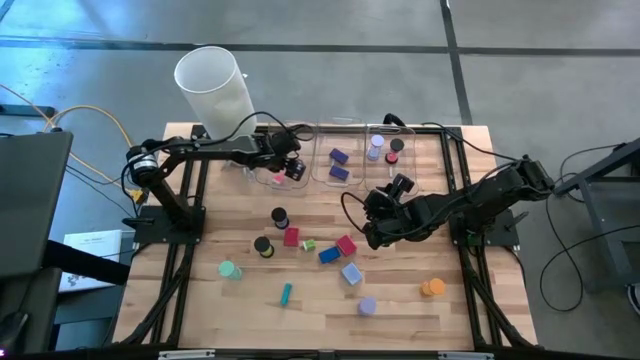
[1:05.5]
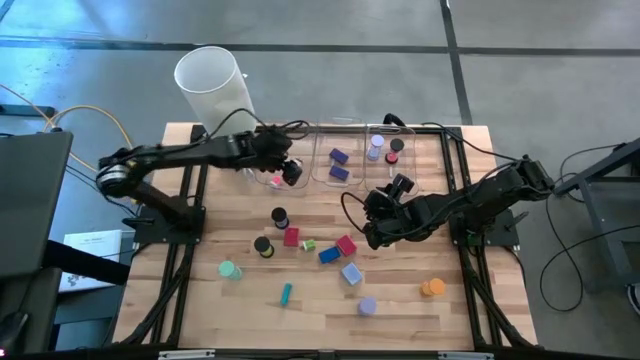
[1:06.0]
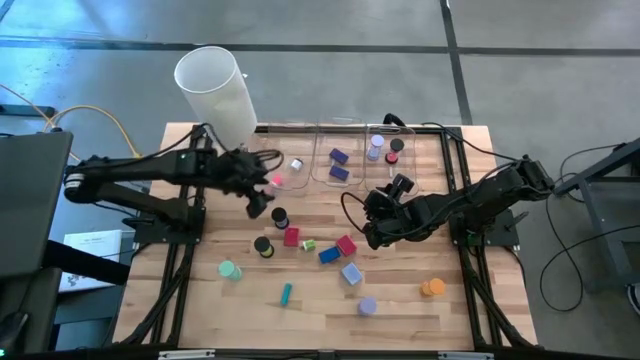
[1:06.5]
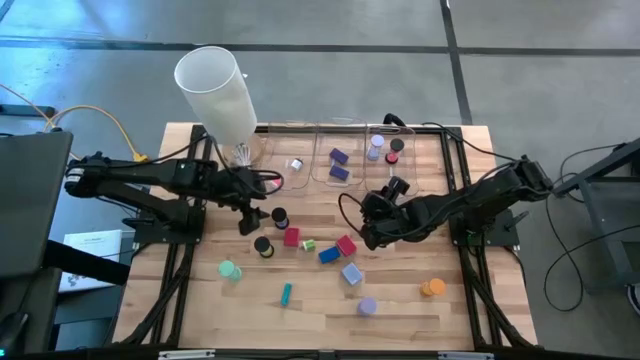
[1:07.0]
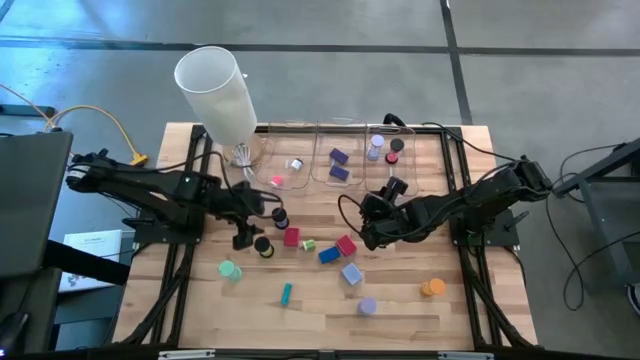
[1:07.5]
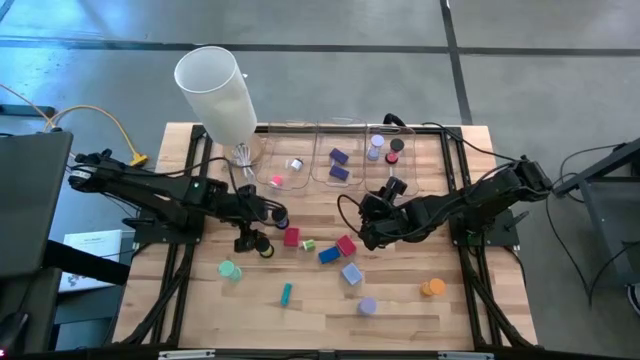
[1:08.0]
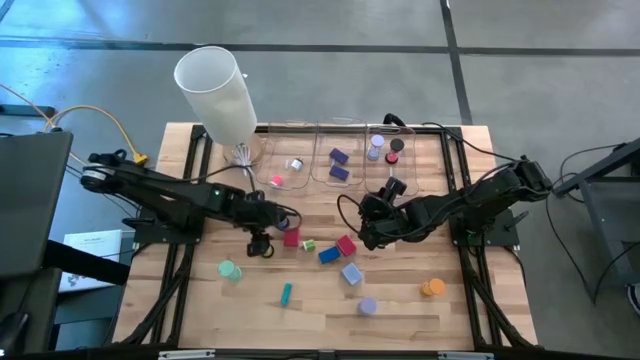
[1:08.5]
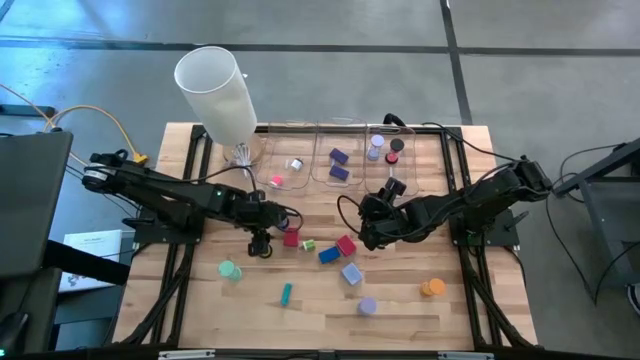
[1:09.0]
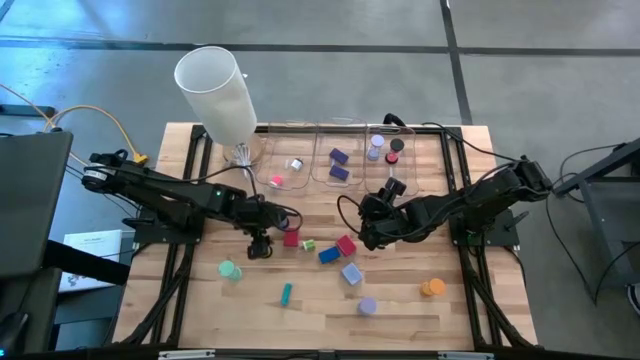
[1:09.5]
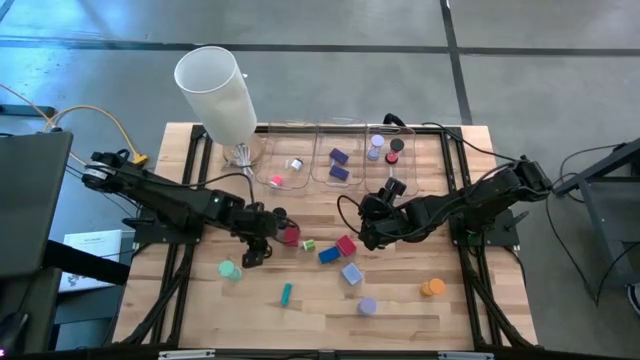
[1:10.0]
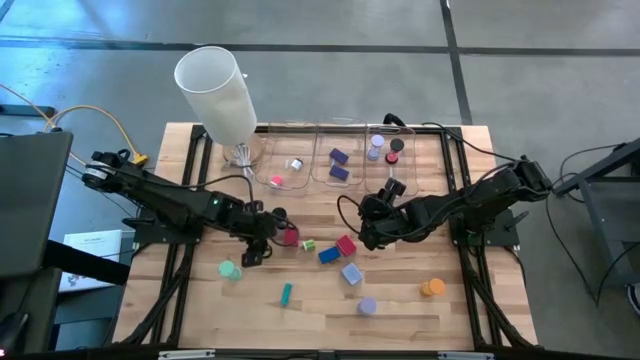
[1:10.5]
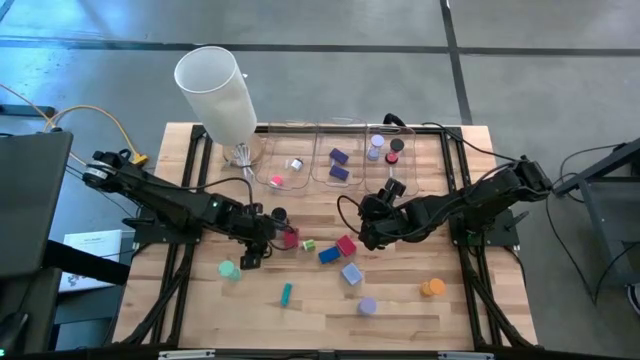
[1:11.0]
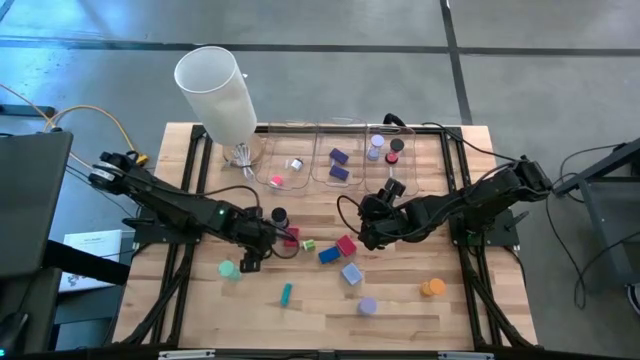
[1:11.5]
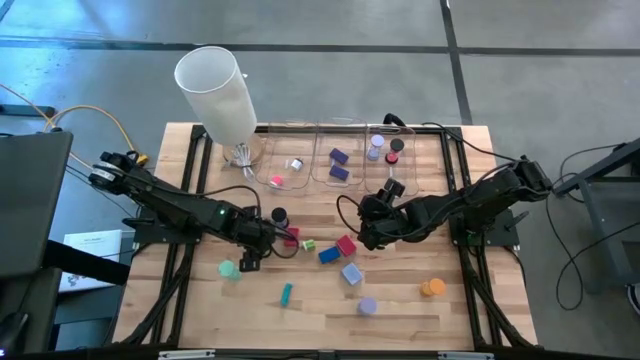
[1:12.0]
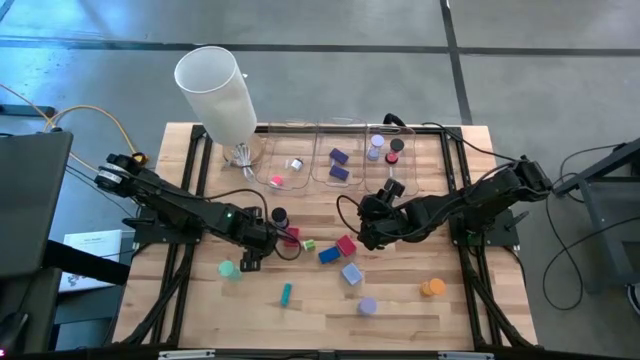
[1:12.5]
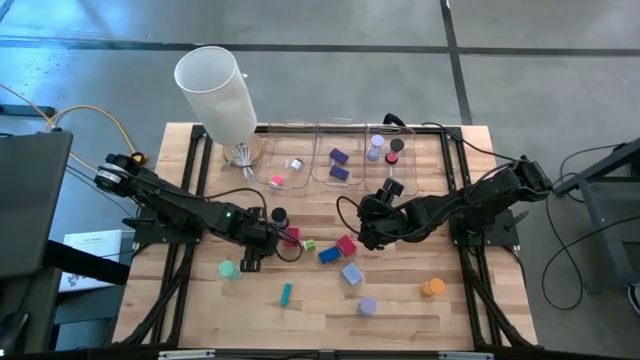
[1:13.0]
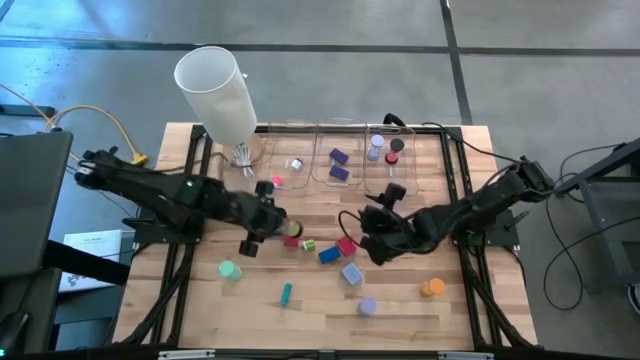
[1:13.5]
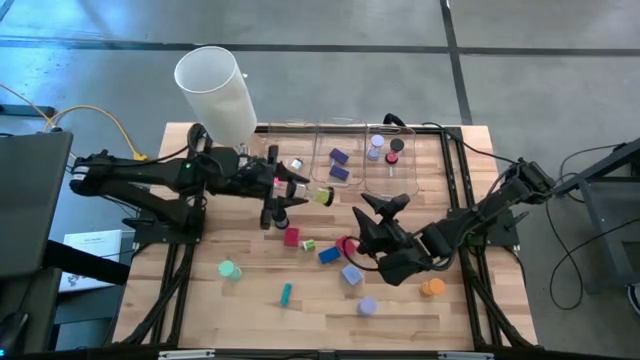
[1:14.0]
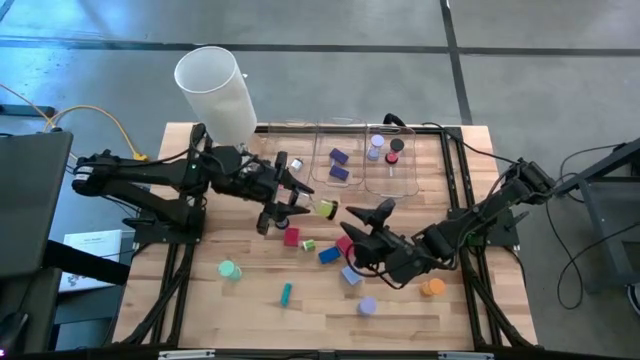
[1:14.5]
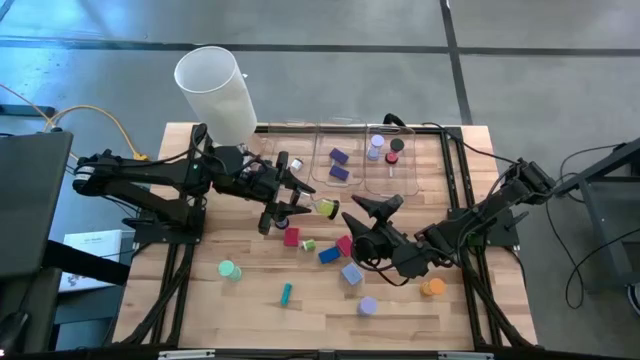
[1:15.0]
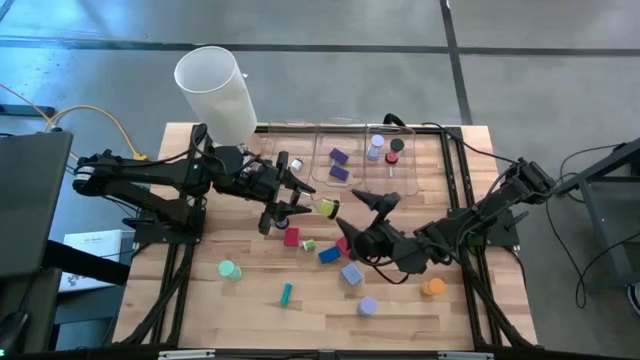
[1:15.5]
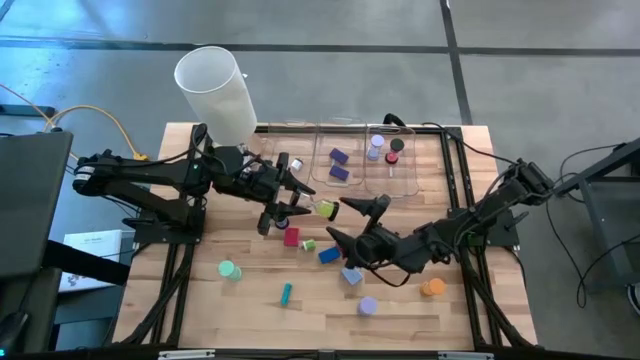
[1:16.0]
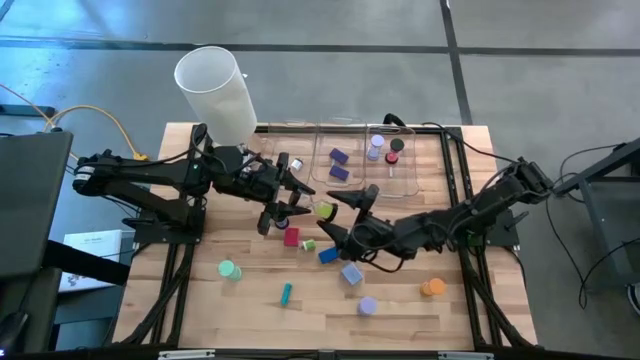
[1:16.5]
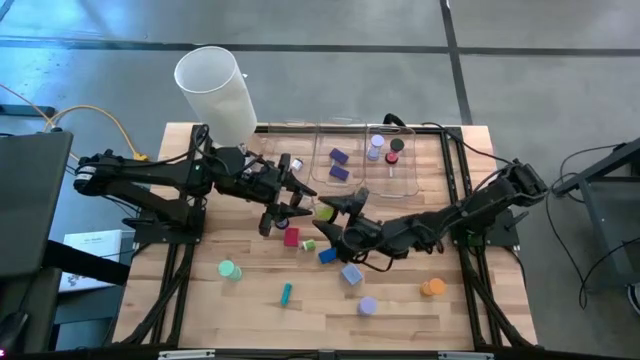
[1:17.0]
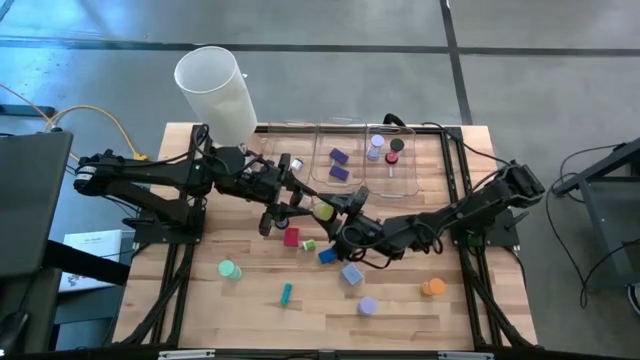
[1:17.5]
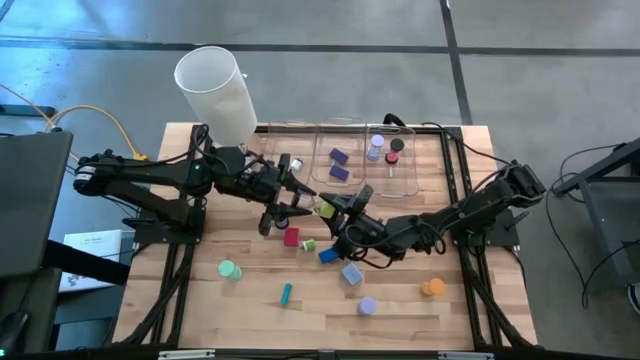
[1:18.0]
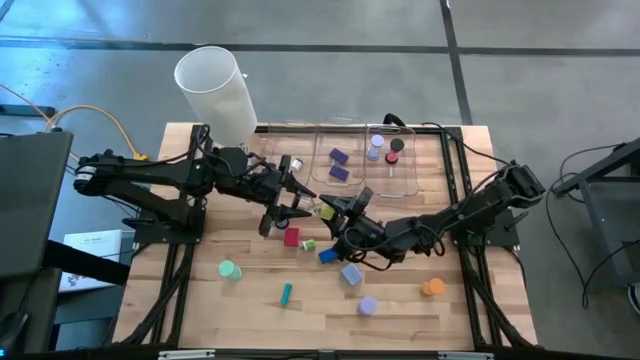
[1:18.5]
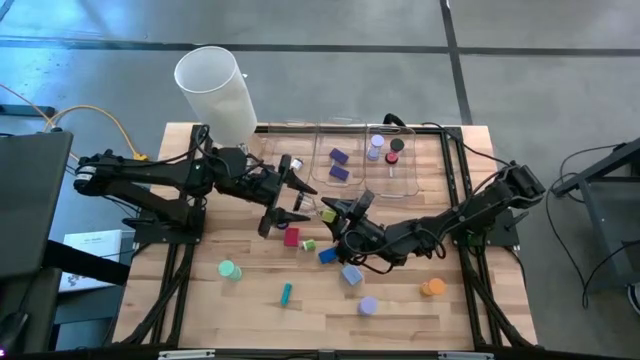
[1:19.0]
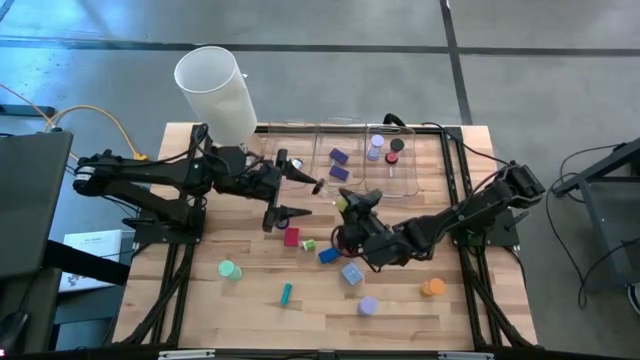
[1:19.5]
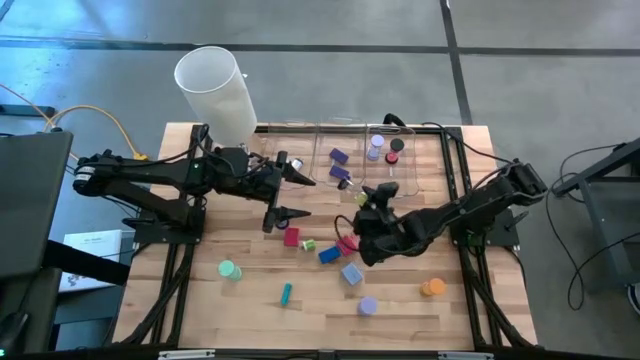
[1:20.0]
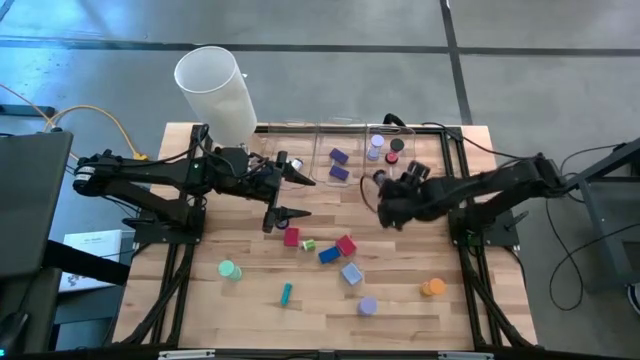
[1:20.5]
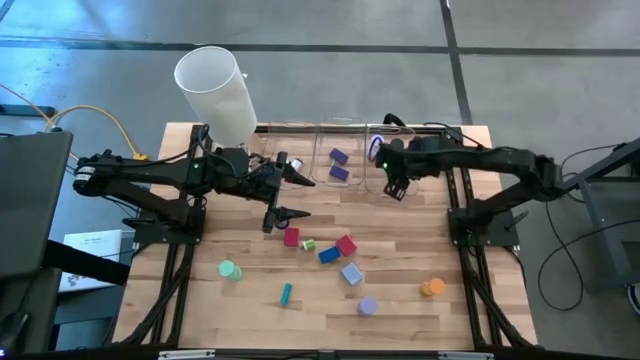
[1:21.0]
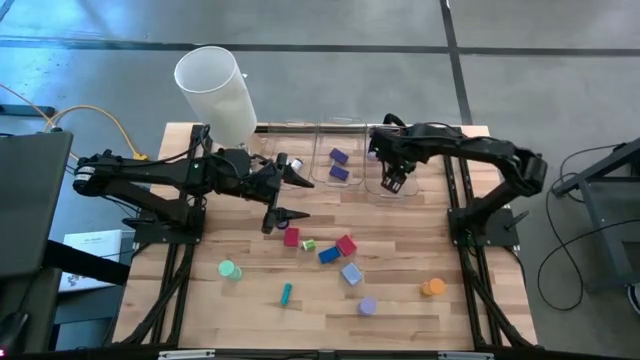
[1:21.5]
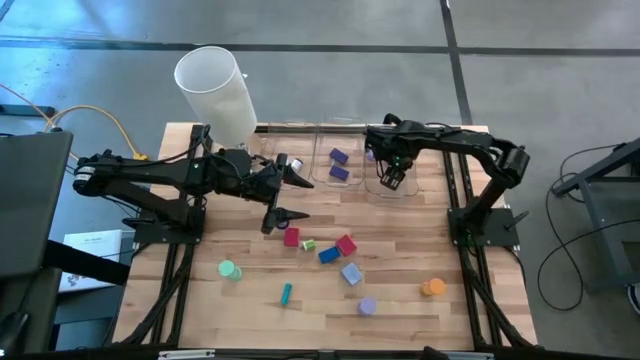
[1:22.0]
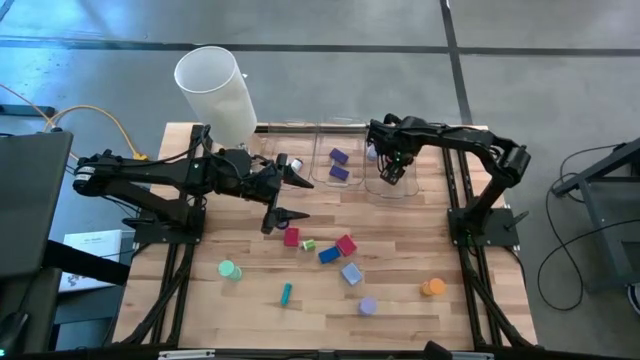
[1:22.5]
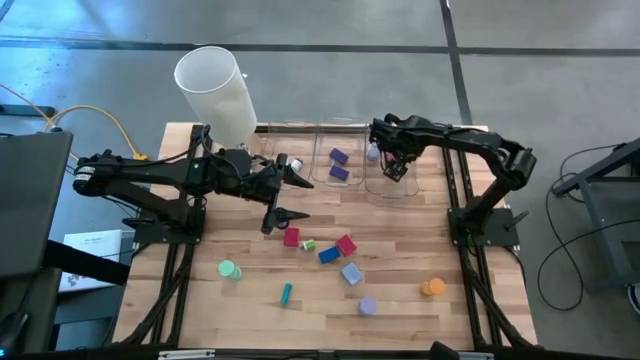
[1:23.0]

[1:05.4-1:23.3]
Task: Pick & Place Office items
Put the green hourglass into the right transparent bin

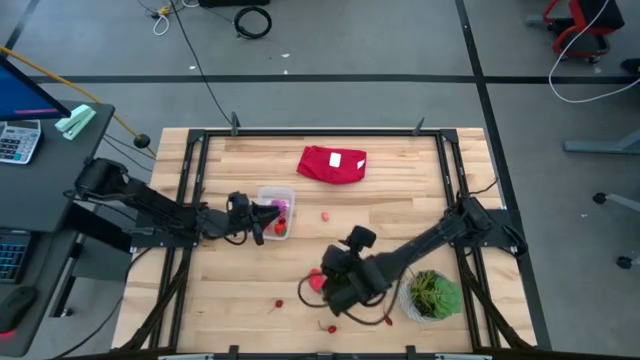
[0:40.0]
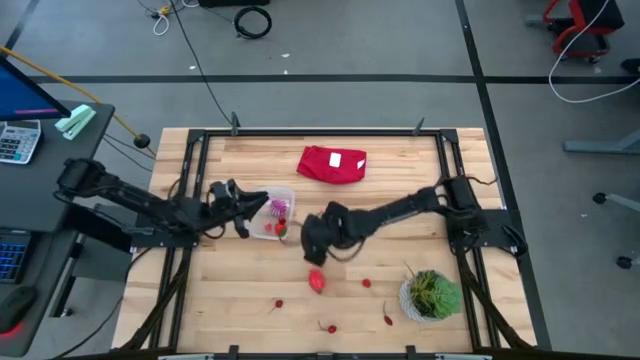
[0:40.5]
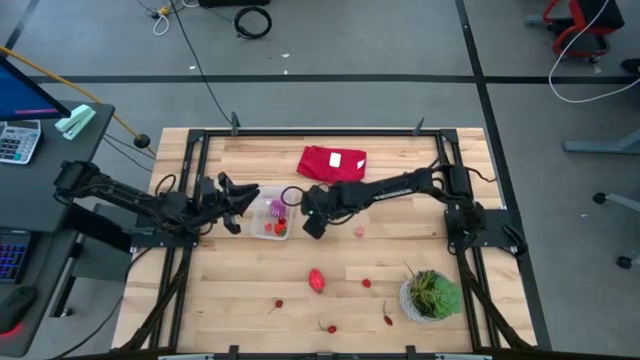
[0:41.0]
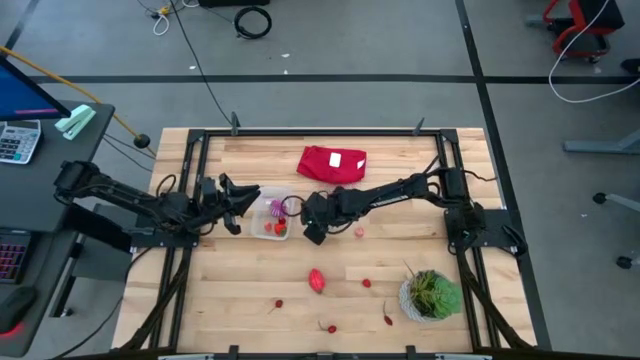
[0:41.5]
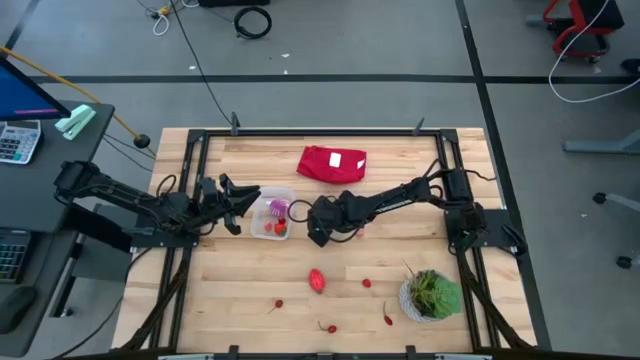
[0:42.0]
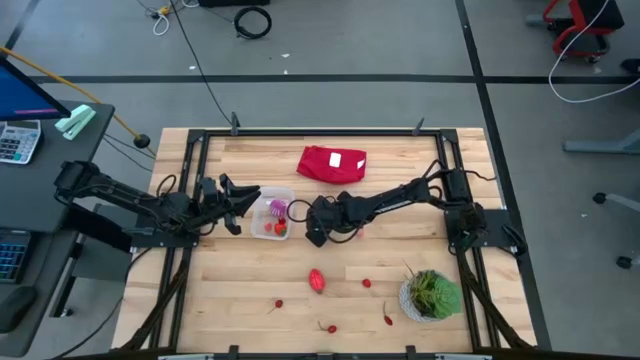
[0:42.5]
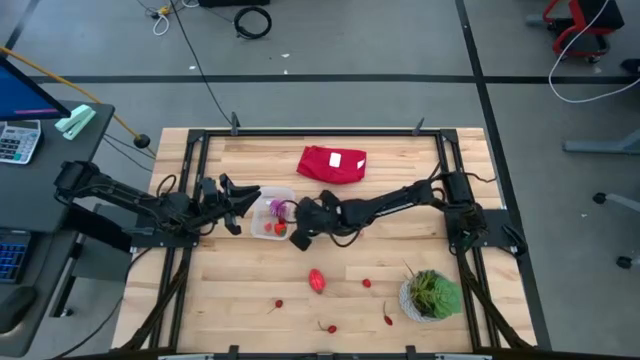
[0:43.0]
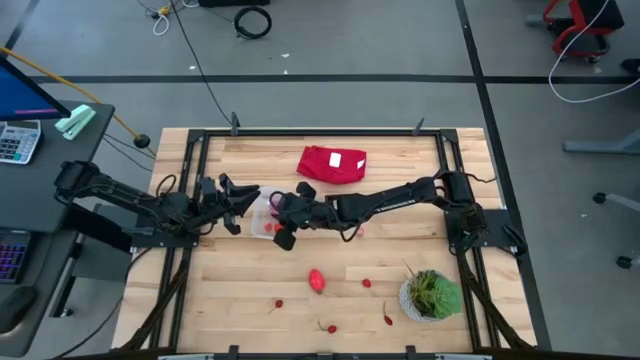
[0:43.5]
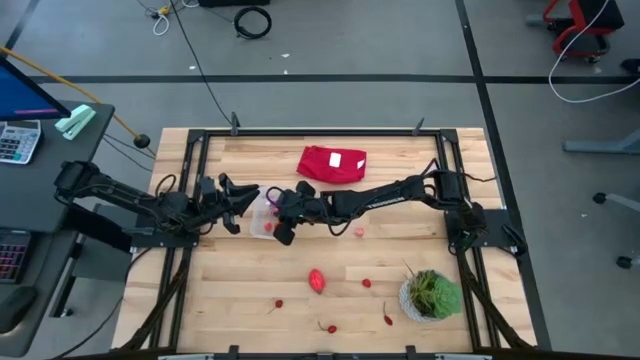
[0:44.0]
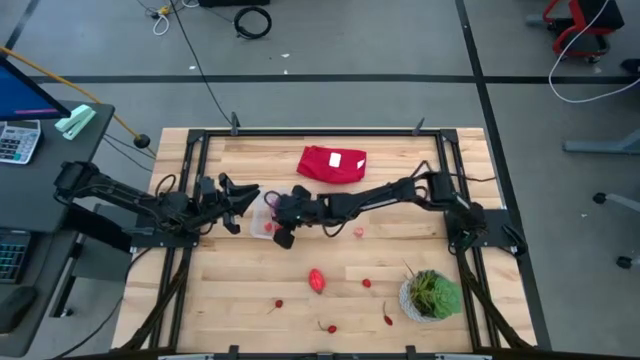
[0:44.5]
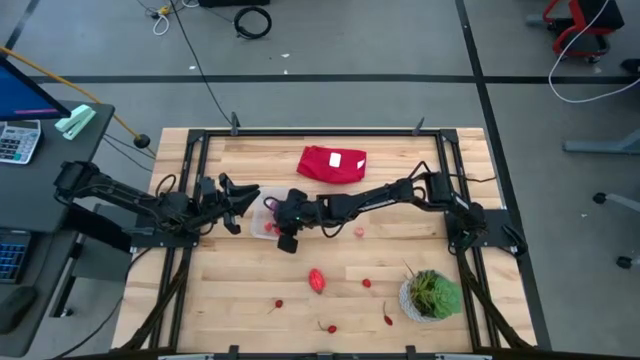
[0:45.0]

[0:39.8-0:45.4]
Task: Pick and placing Produce into tupperware
Put the left pink peach in the transparent bin
